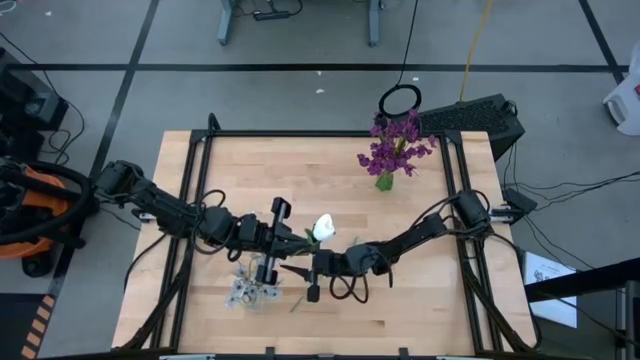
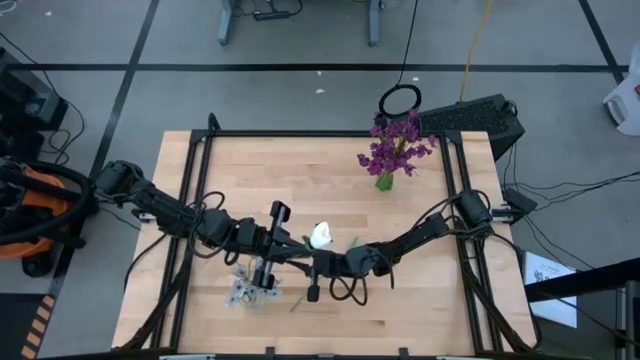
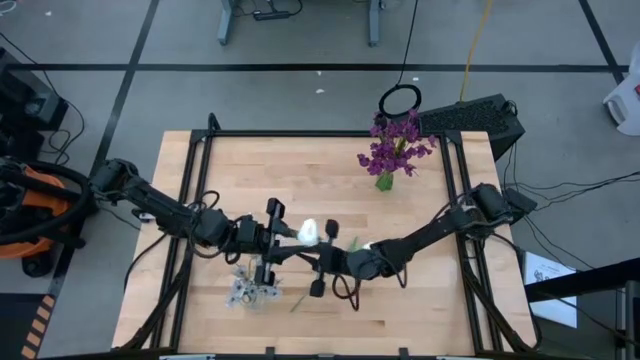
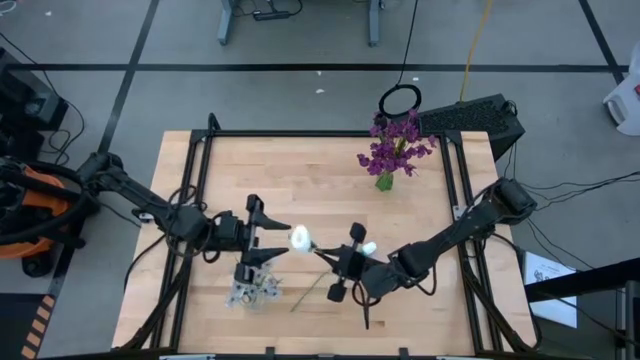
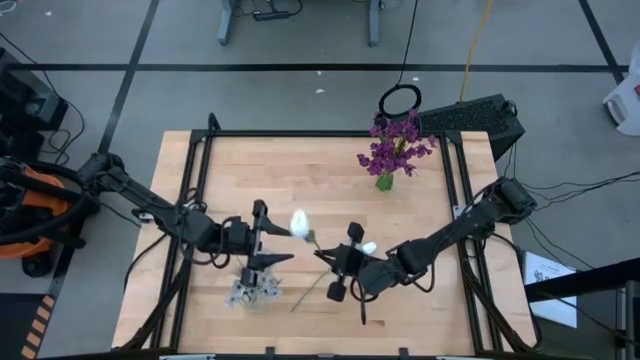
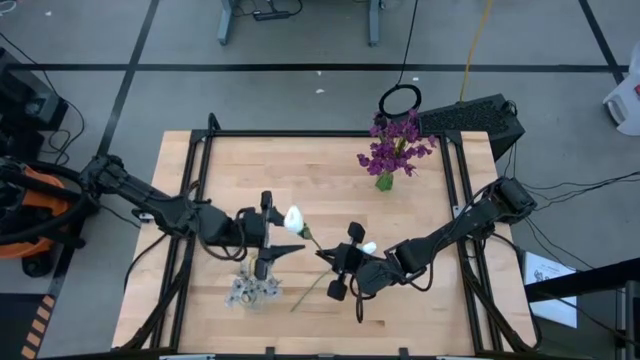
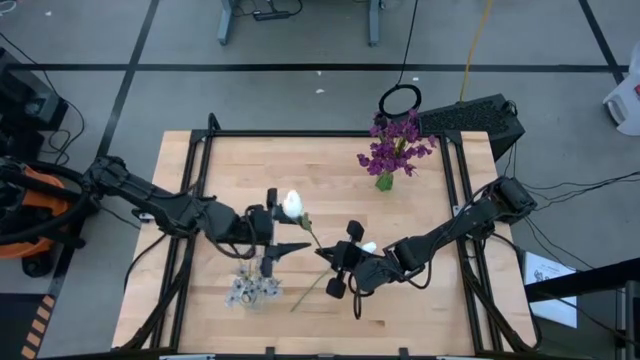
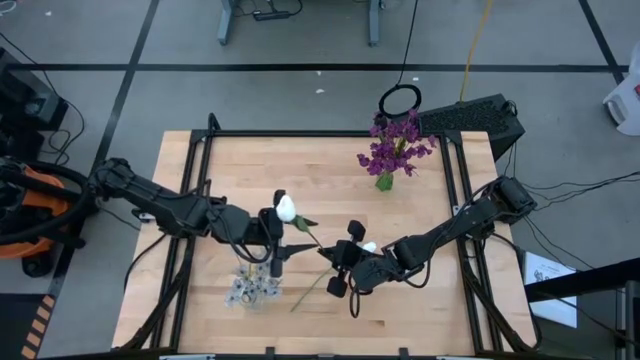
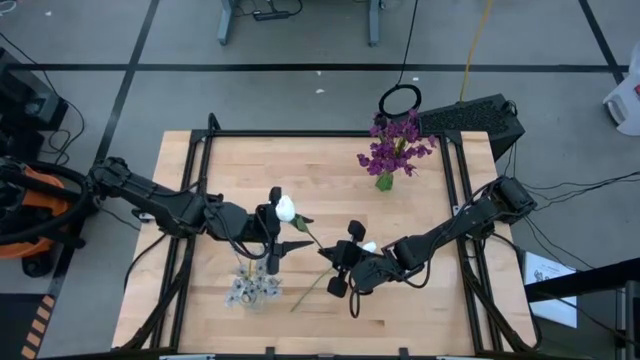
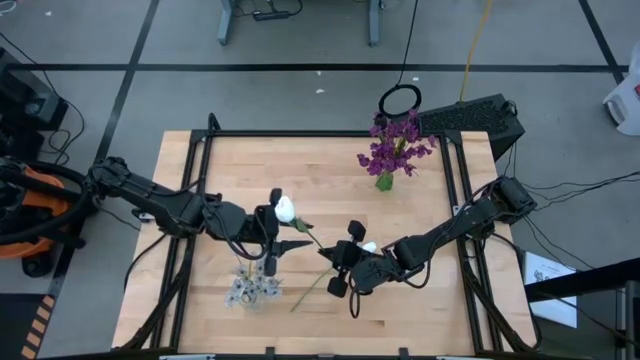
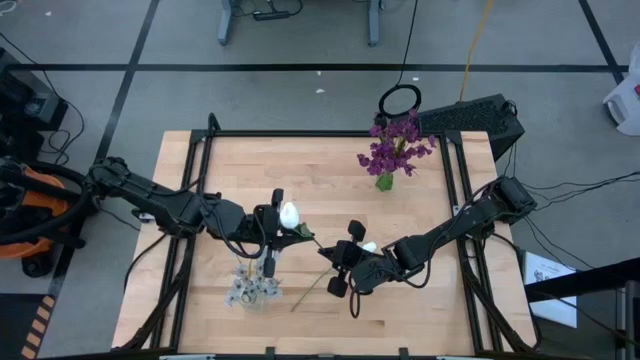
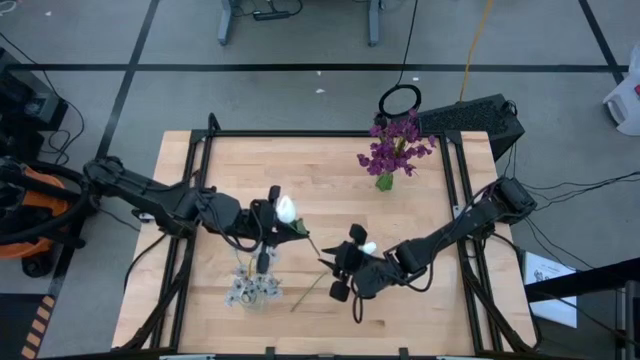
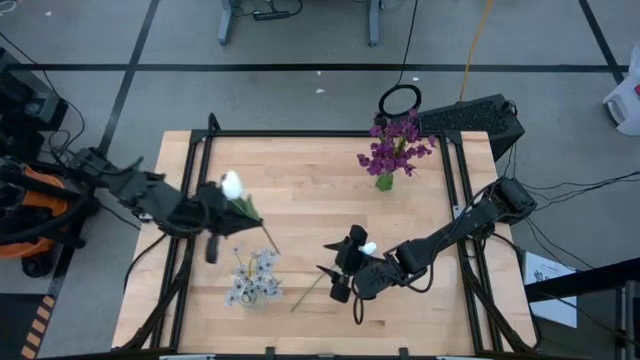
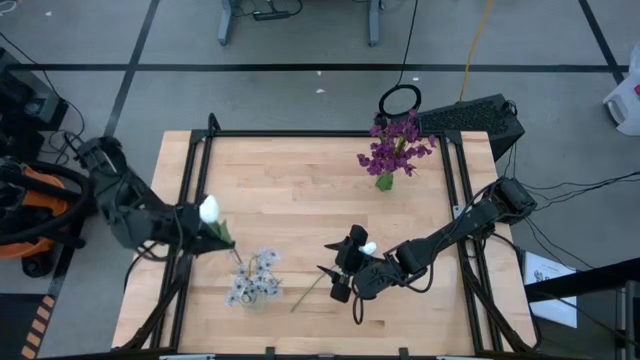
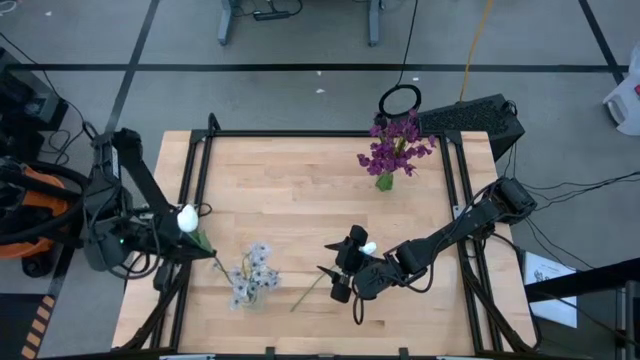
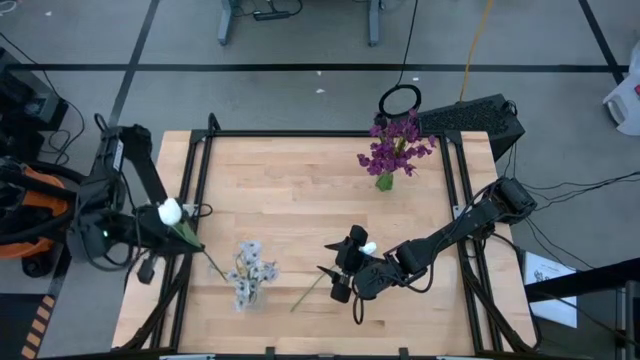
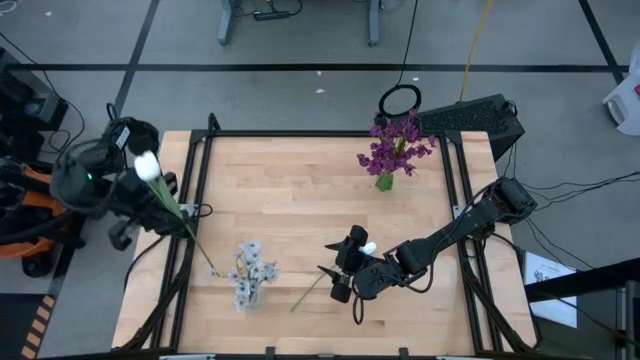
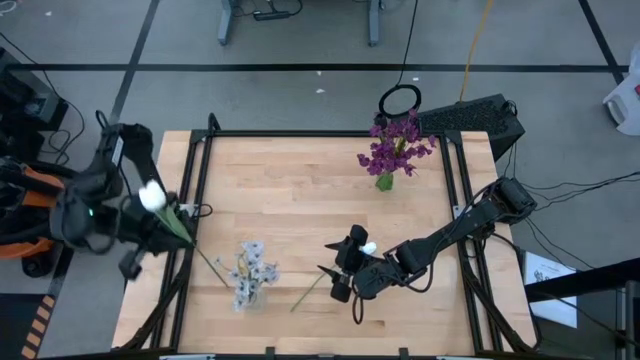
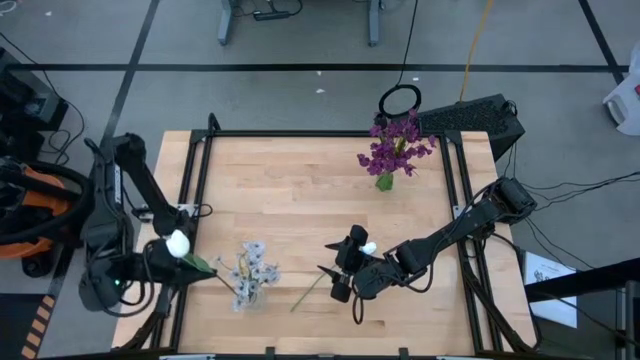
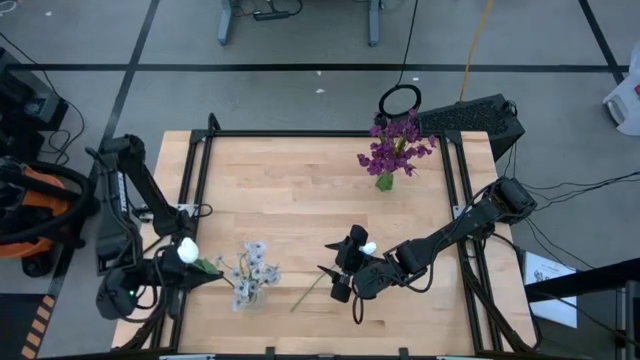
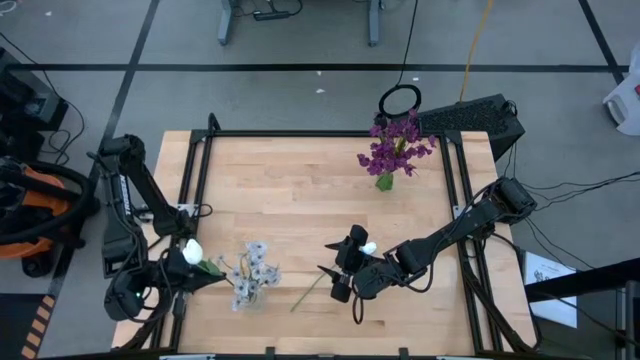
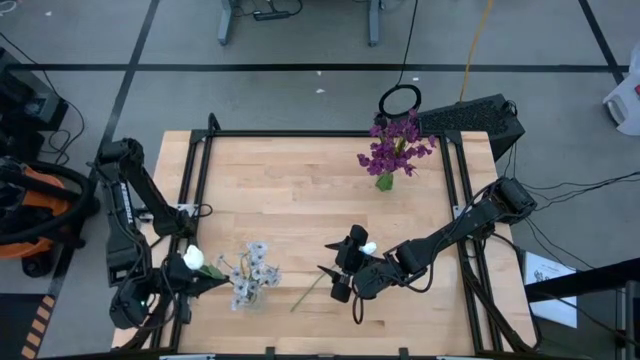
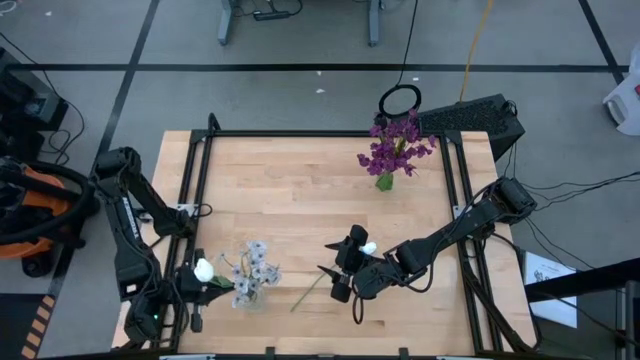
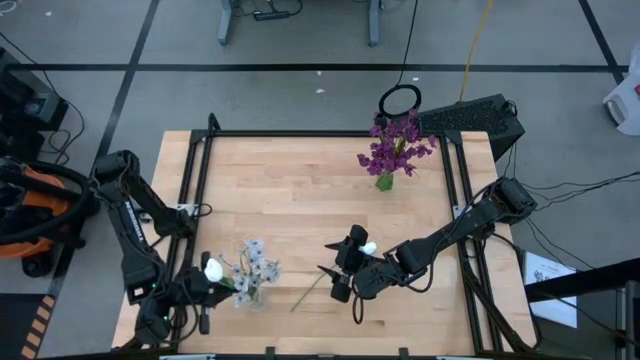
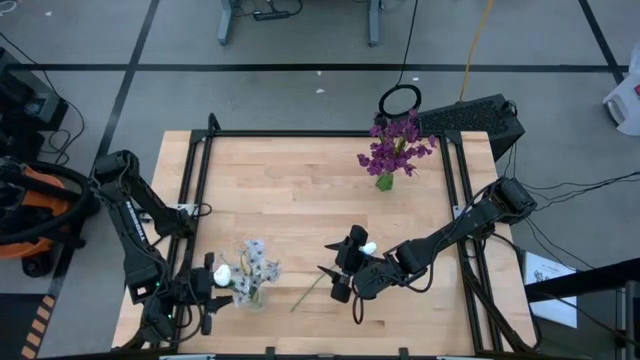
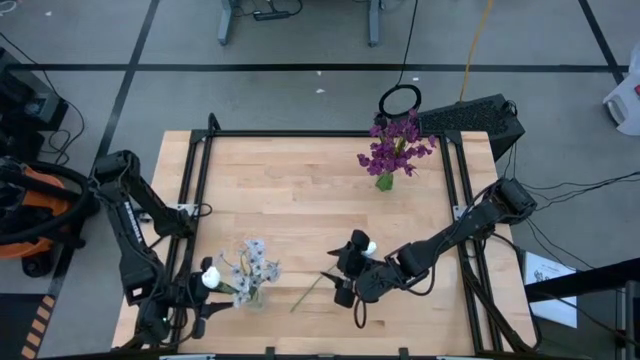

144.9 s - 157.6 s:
Task: Sort flowers into vase by color
Put the left white flower into the transparent vase

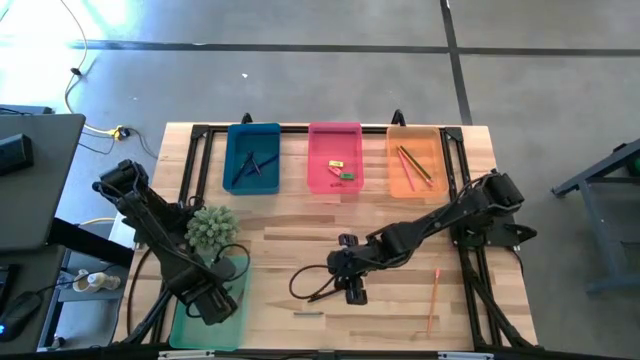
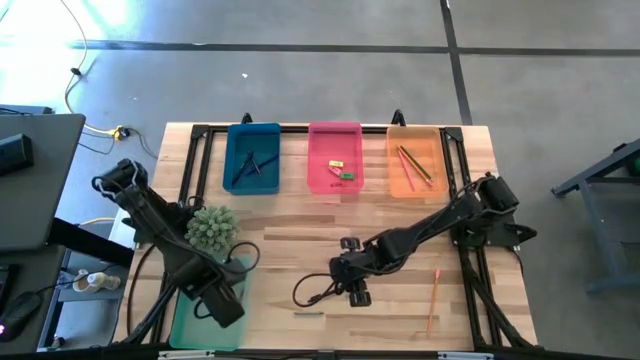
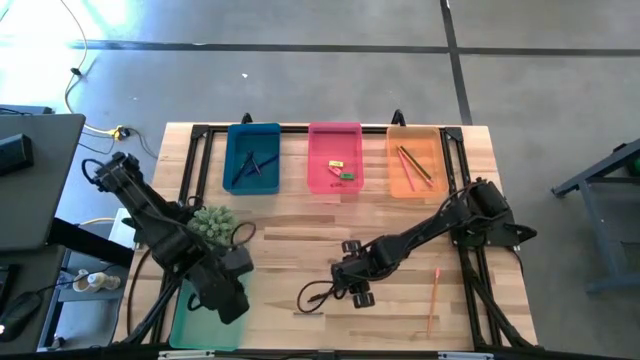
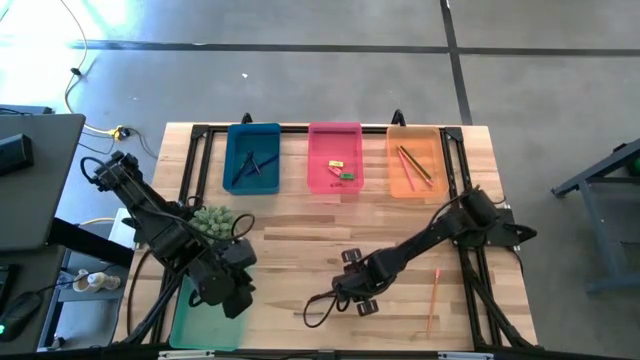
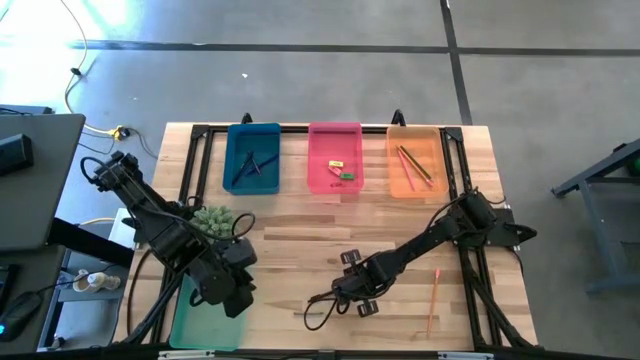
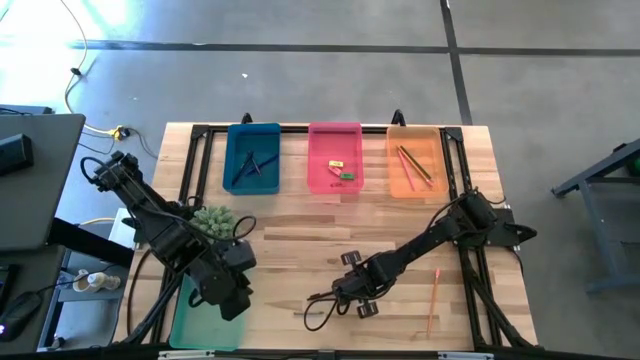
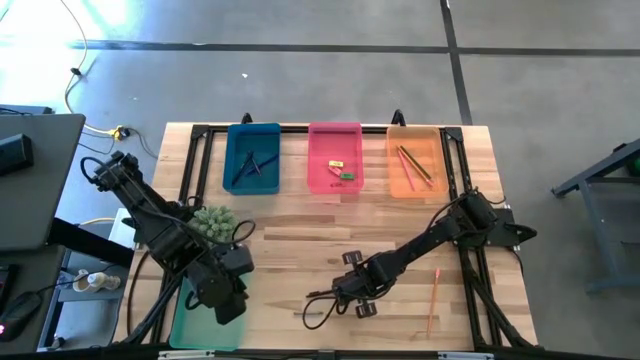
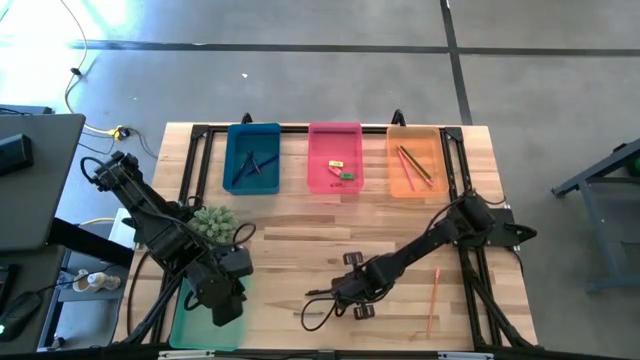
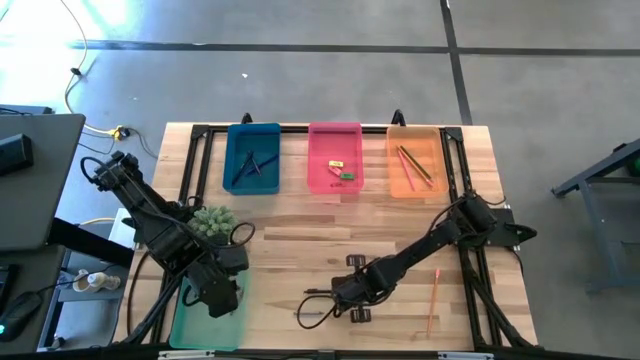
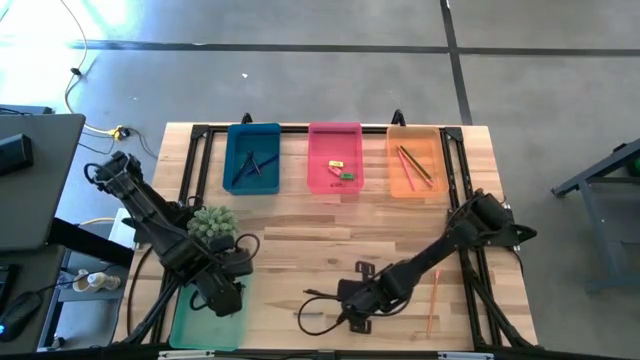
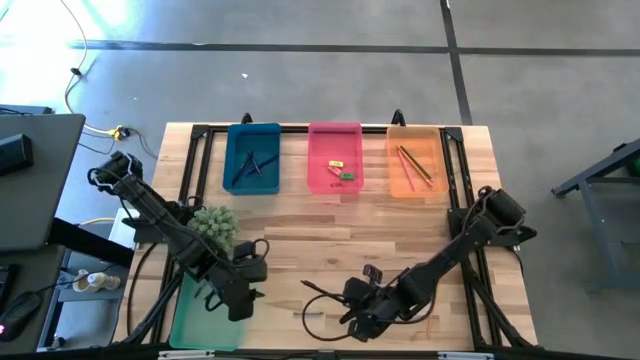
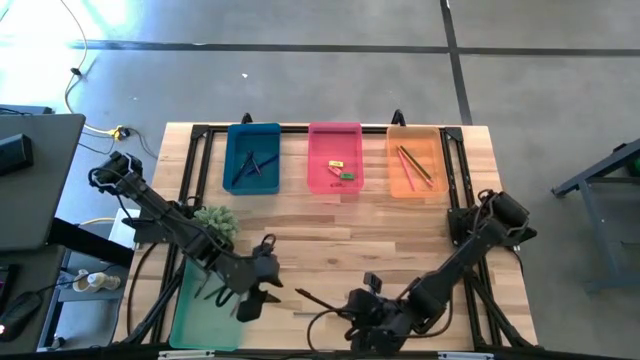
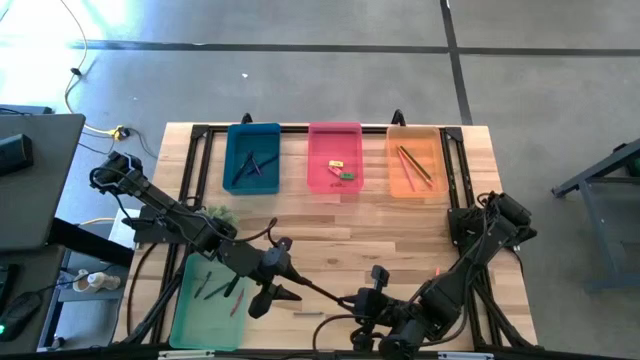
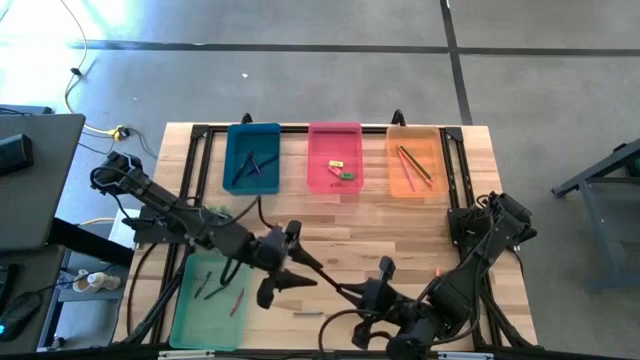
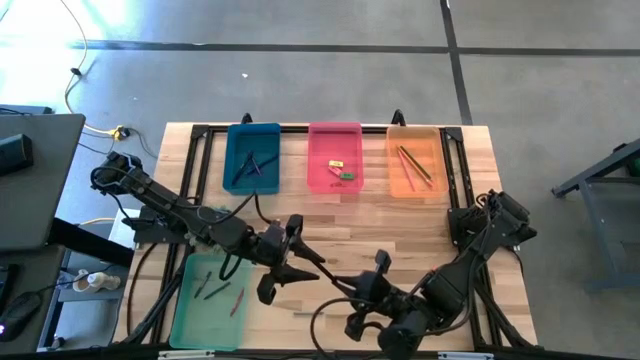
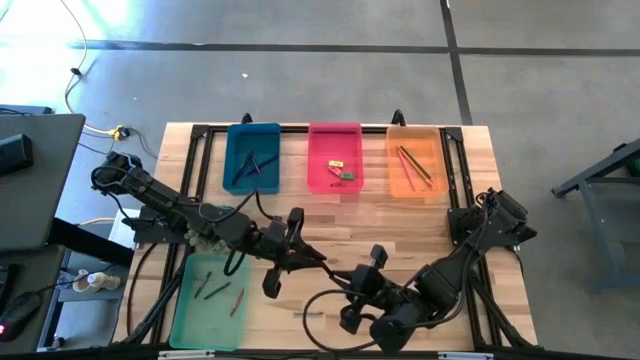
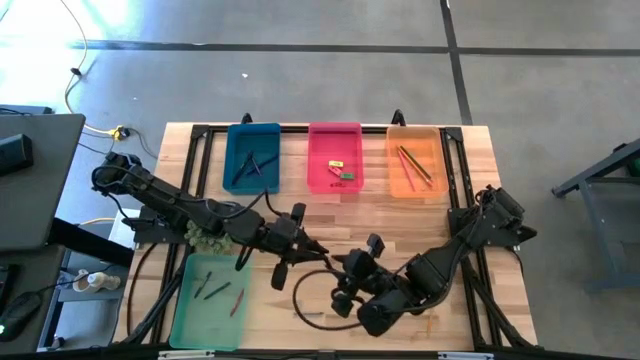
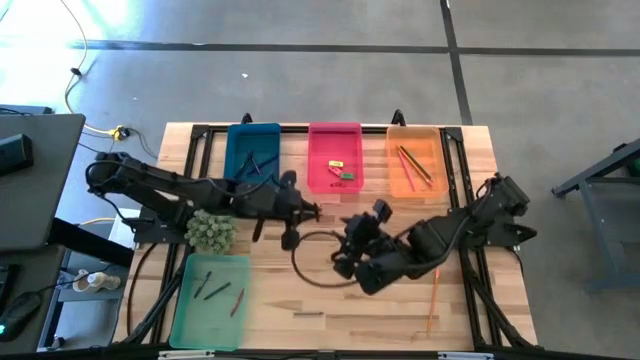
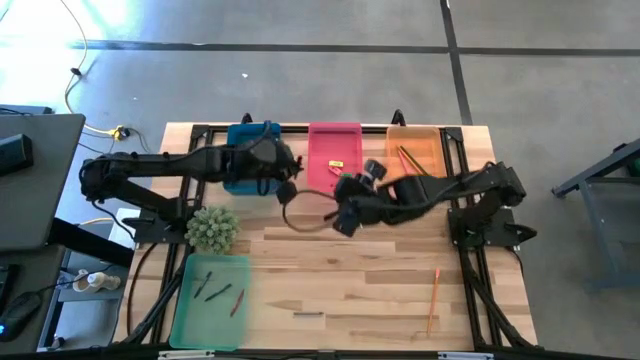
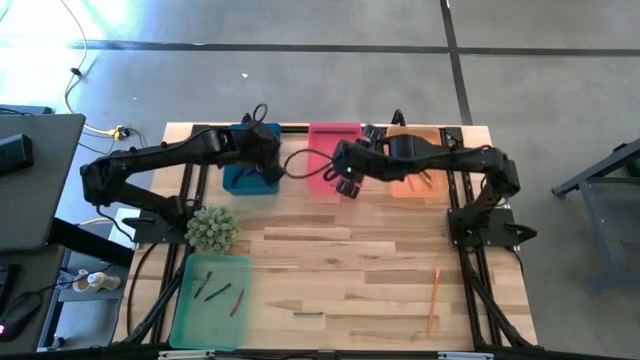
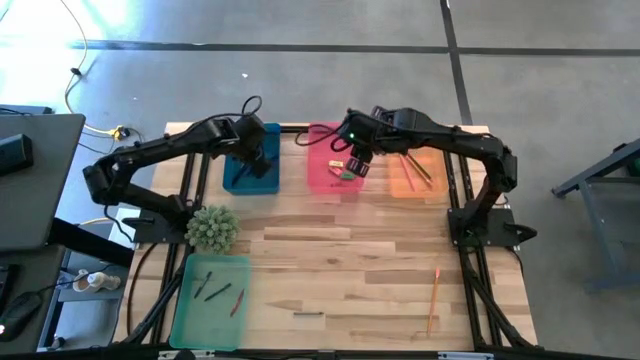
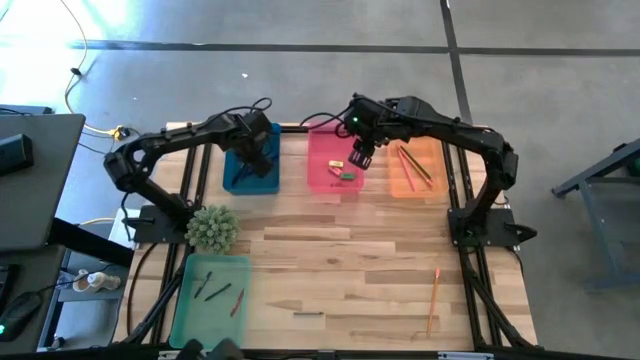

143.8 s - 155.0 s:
Task: Sort crayons/erasers/pens/pencils in bins
Put the black pen into the blue bin
